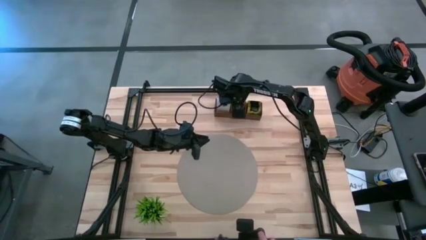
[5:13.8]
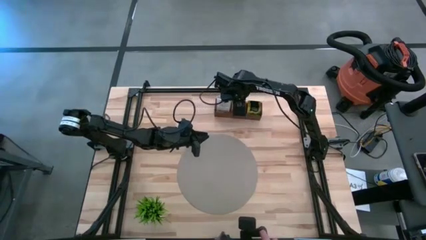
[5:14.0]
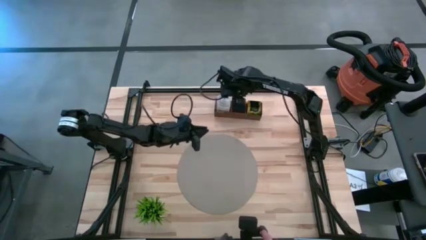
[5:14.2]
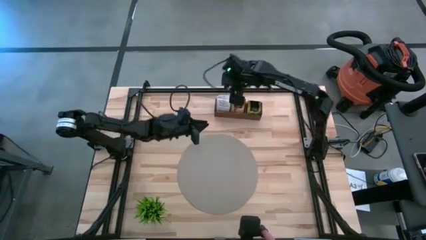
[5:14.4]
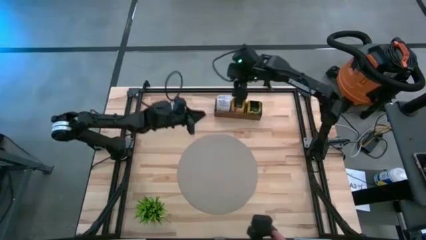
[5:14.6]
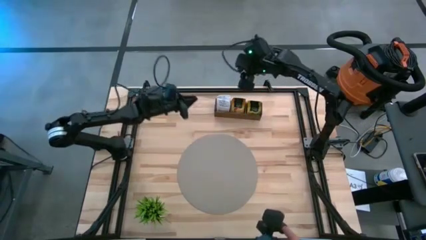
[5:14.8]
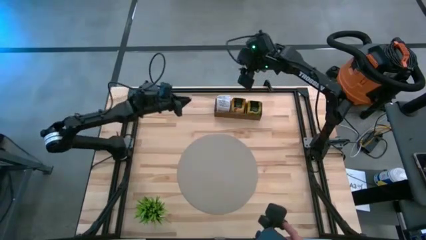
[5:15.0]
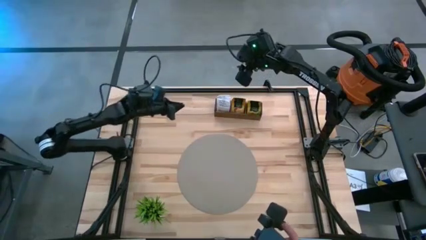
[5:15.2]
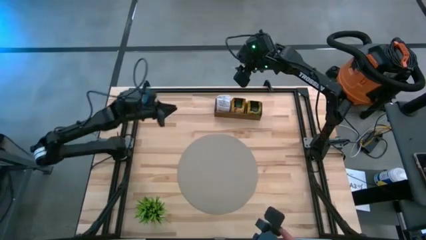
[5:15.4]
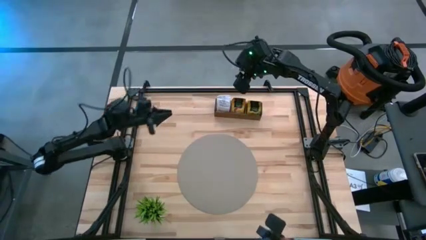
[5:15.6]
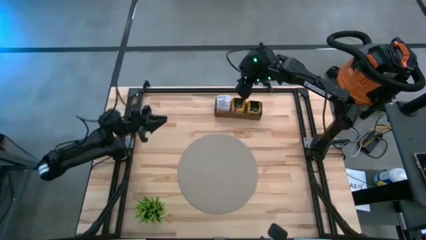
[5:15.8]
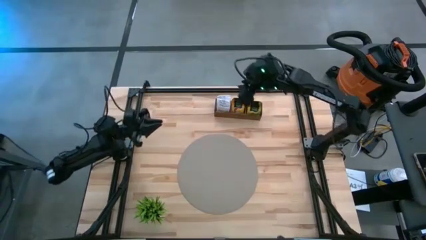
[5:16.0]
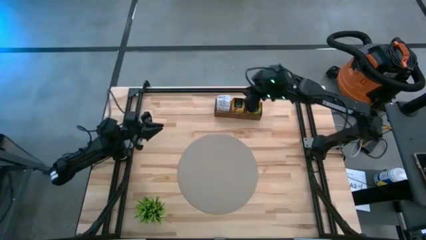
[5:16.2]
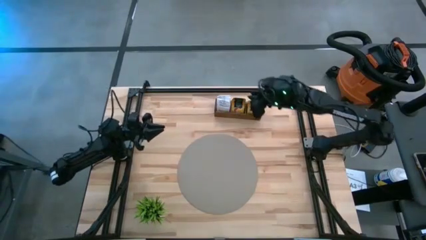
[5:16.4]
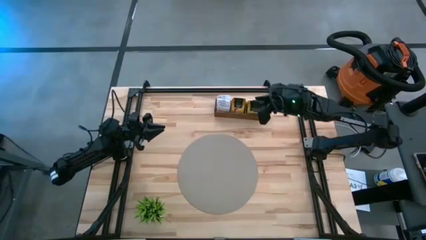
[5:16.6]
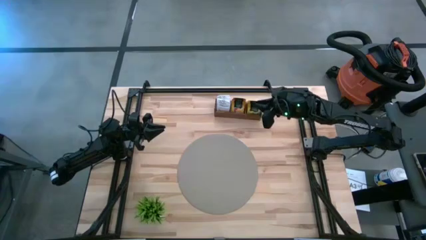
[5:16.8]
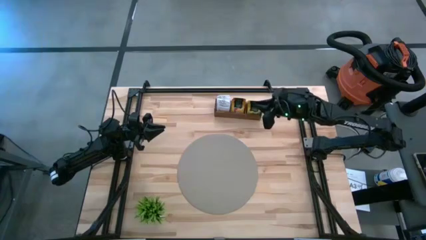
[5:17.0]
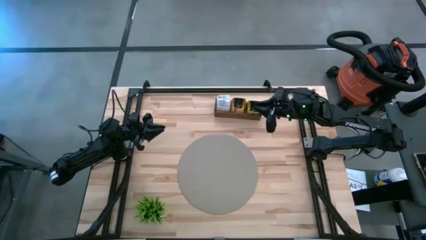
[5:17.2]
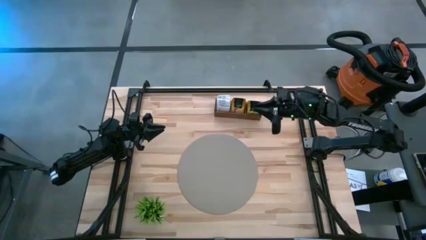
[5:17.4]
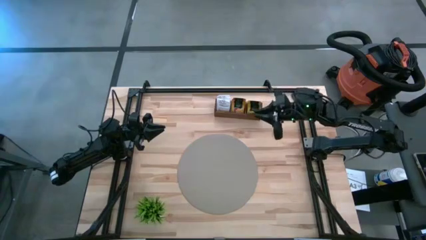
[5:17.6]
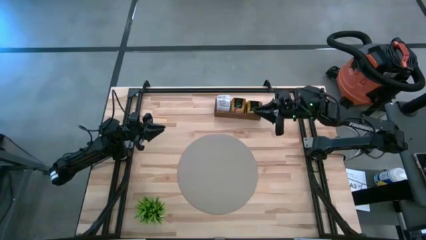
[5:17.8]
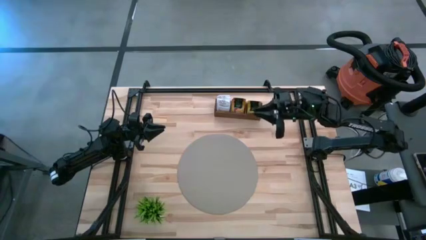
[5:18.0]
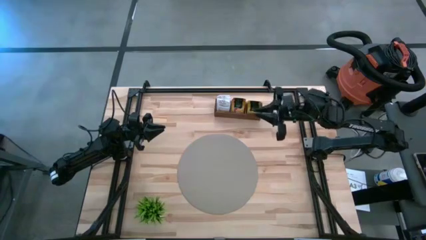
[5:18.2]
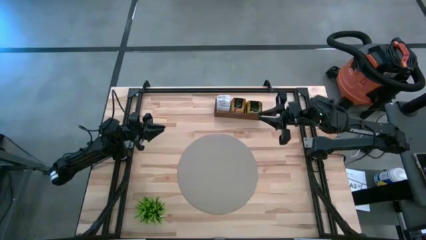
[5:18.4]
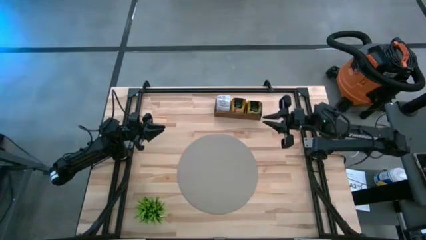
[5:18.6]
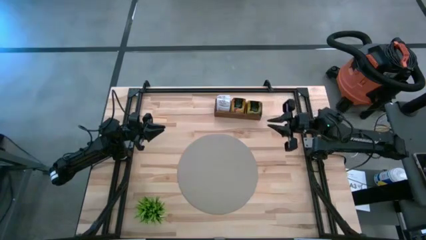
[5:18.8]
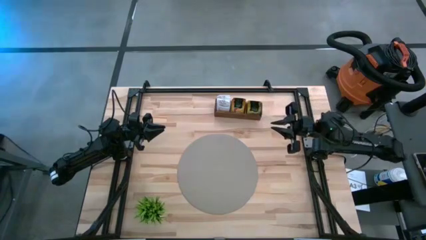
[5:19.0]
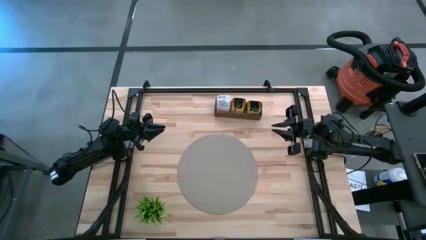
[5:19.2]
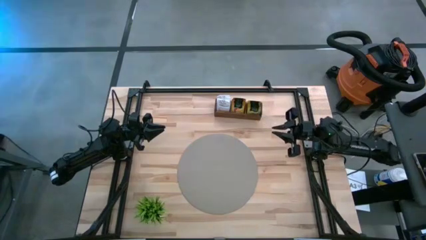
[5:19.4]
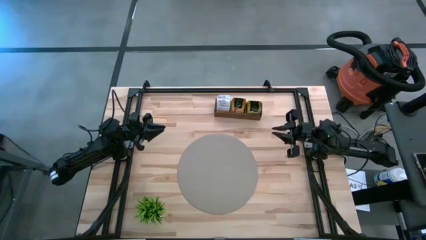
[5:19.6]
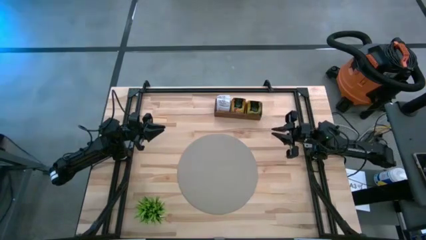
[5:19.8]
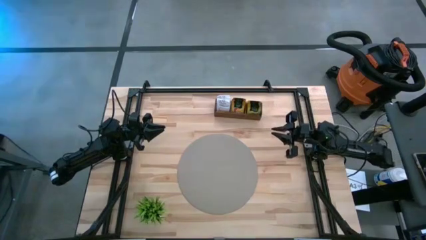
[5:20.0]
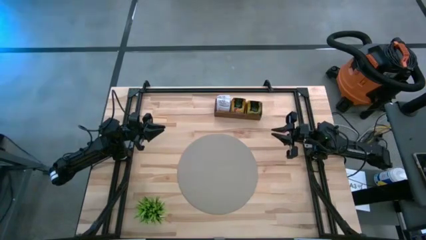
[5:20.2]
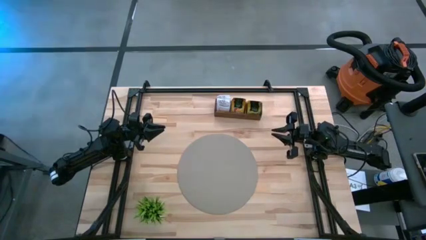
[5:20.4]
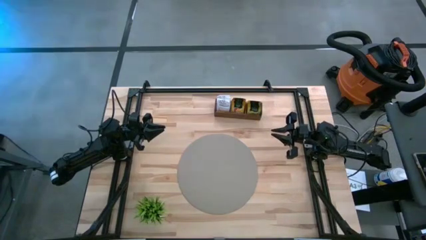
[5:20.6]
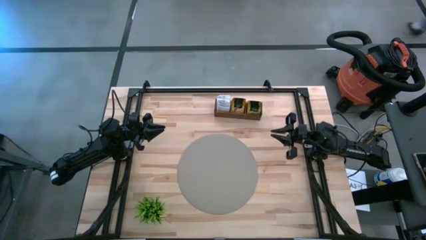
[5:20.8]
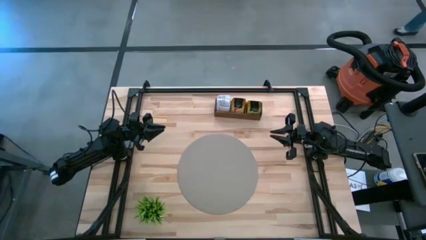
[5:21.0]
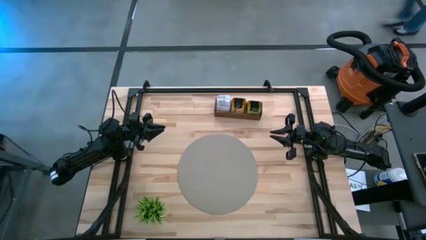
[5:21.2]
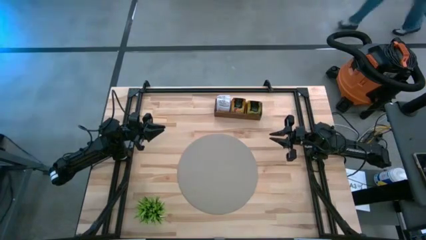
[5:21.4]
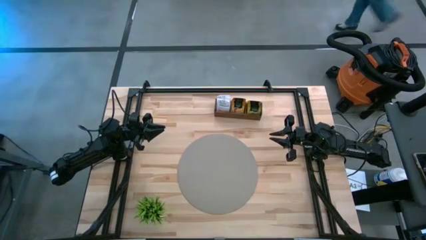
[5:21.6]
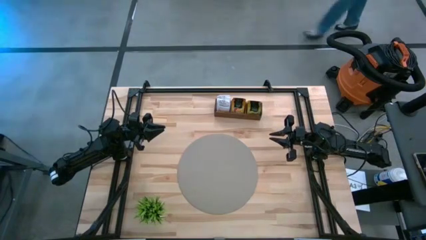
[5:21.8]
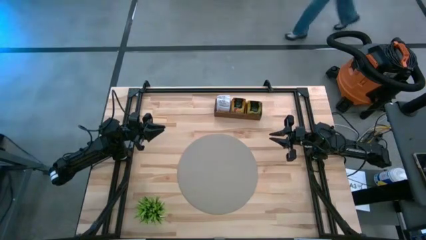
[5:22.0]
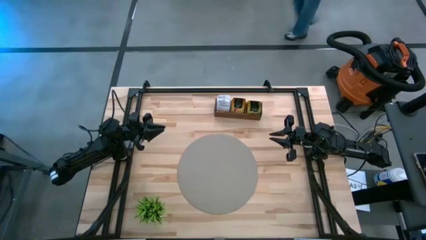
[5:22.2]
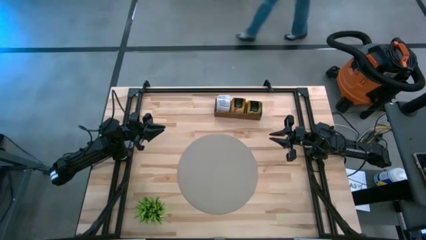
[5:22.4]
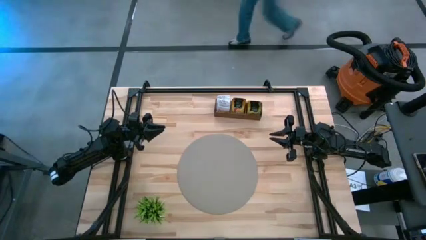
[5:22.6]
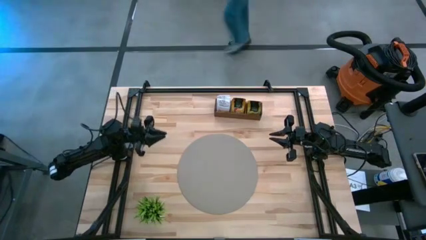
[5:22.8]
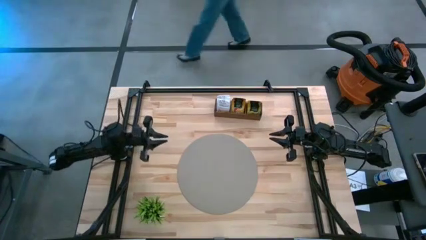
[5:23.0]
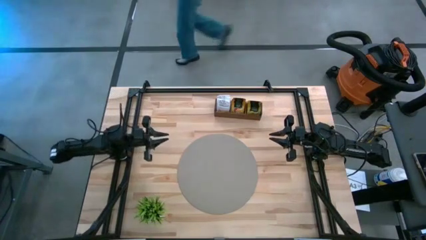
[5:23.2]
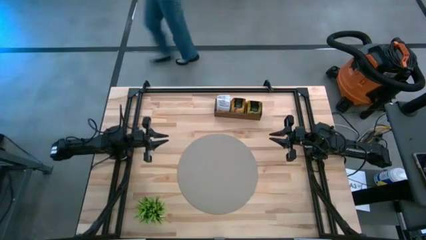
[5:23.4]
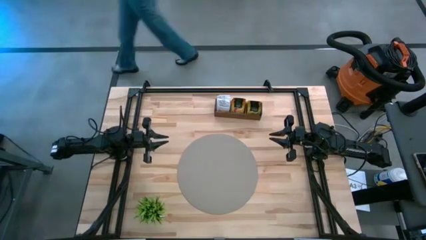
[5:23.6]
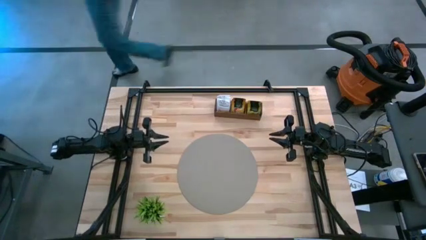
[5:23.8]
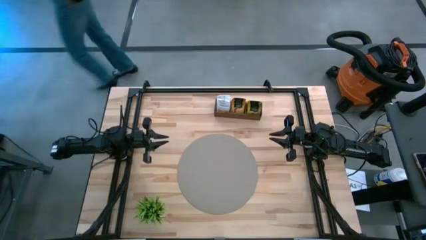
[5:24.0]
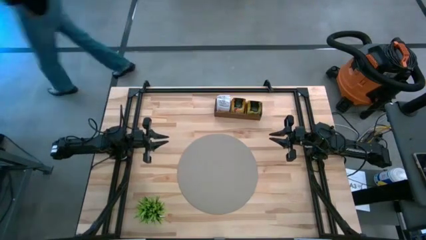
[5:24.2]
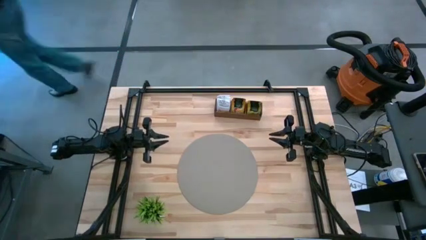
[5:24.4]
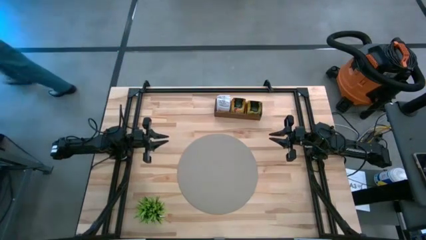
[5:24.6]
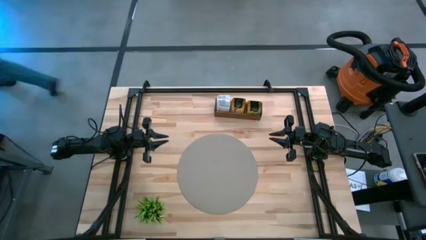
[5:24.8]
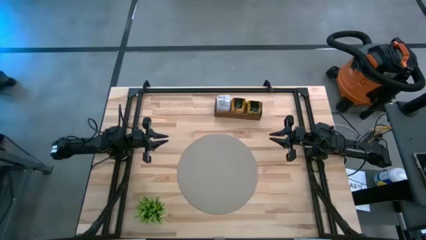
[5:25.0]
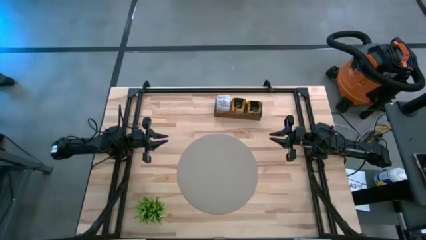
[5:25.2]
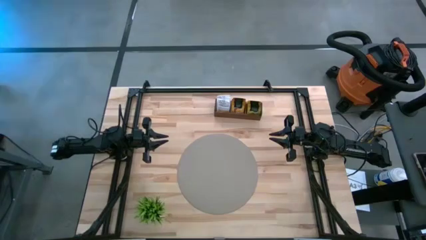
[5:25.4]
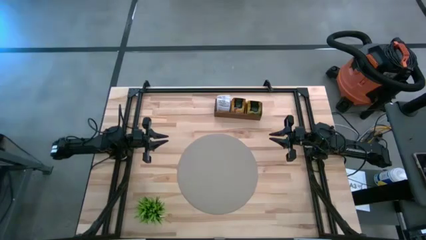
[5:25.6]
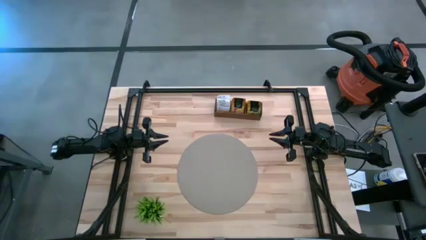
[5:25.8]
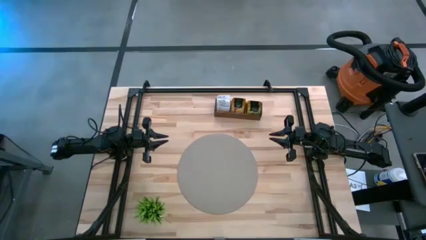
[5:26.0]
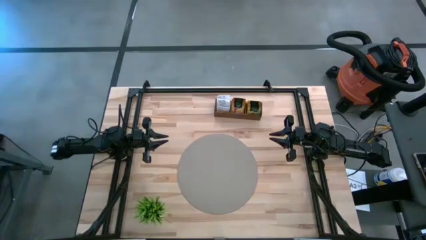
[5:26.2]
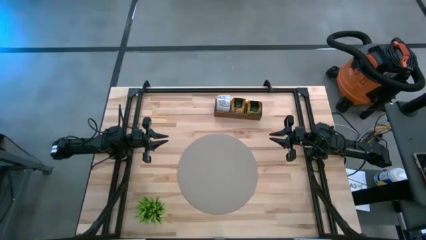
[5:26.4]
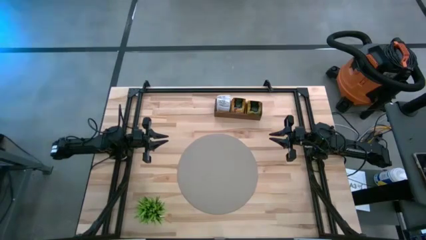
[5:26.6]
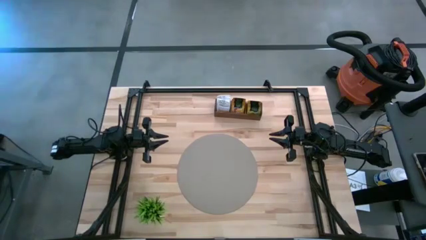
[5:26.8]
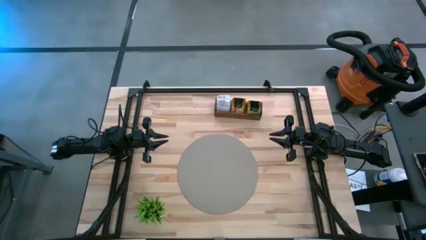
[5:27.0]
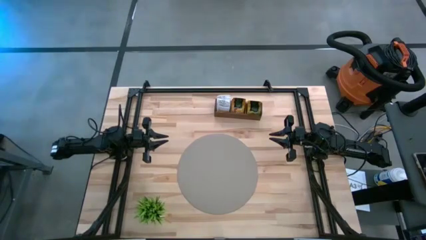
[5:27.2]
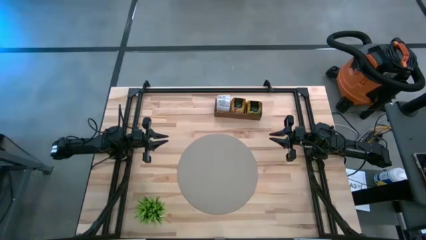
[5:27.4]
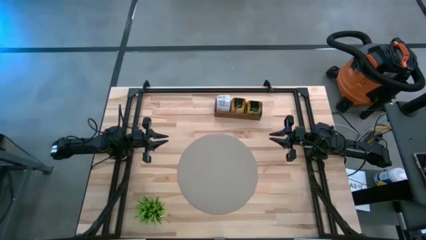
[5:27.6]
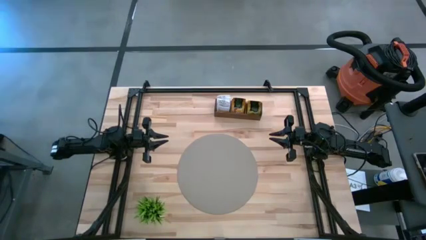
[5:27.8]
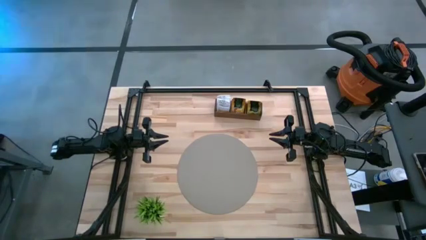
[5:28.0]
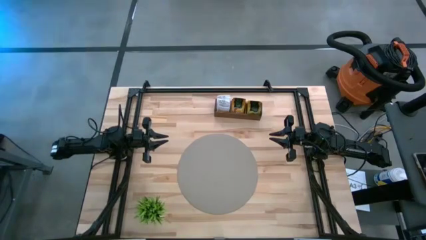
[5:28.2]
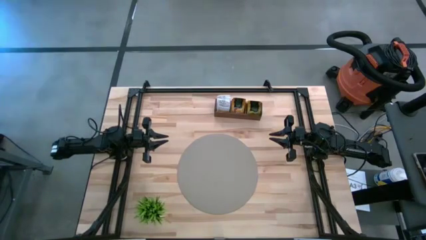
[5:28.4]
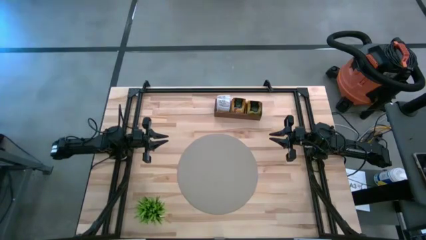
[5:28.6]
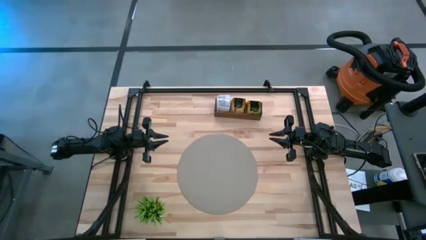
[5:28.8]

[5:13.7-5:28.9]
Task: Pick & Place Tea
Return to Home Position
